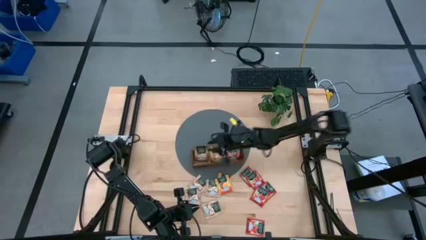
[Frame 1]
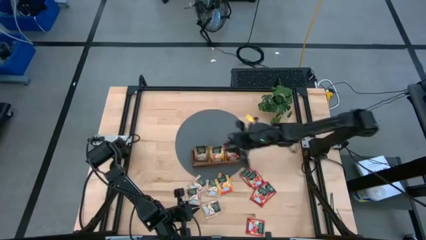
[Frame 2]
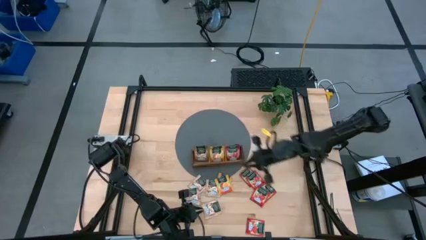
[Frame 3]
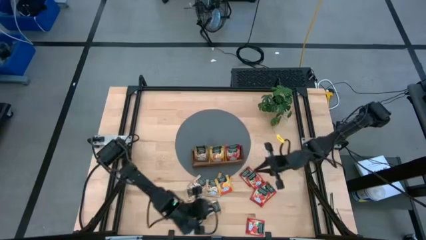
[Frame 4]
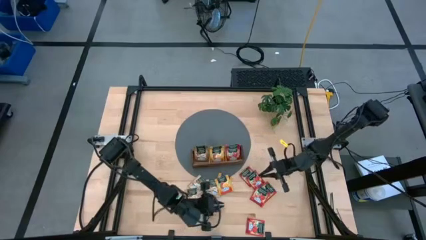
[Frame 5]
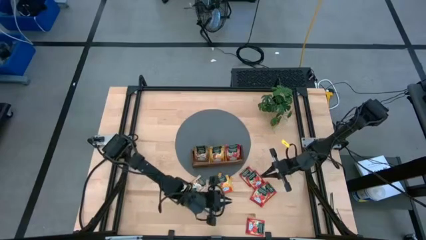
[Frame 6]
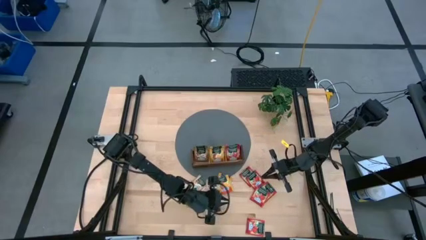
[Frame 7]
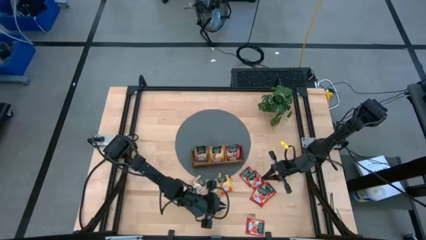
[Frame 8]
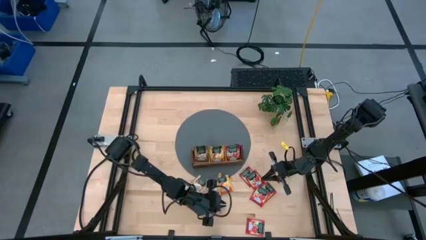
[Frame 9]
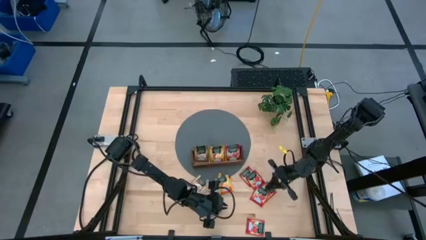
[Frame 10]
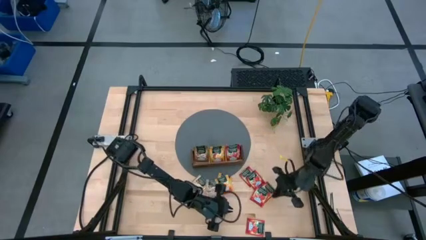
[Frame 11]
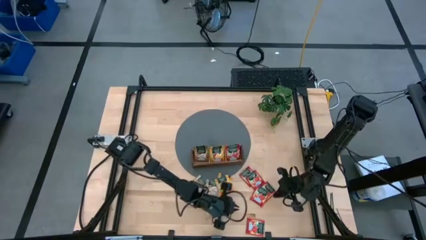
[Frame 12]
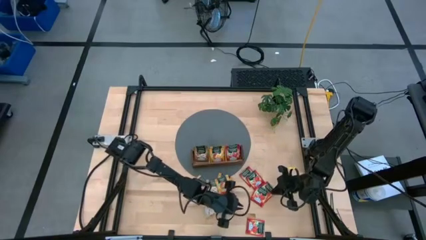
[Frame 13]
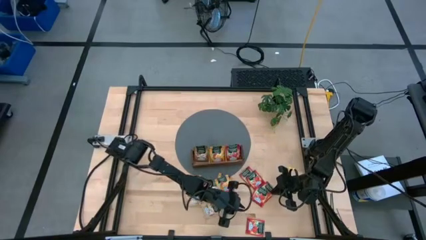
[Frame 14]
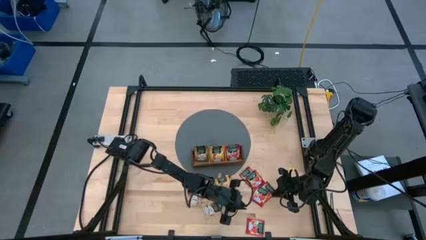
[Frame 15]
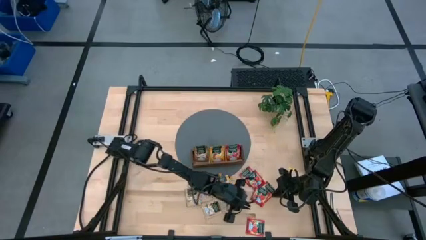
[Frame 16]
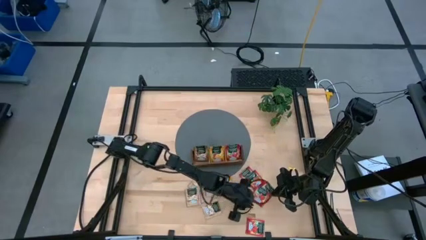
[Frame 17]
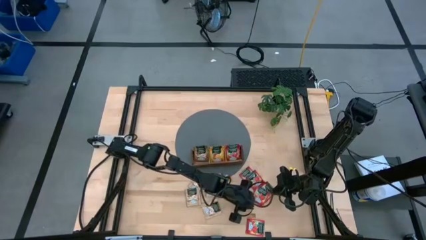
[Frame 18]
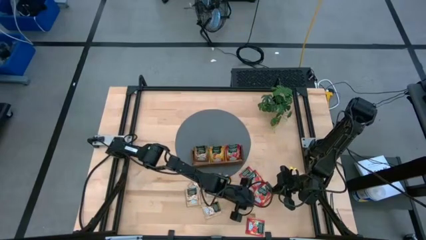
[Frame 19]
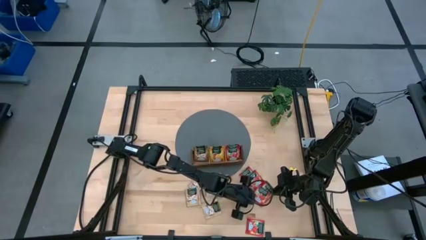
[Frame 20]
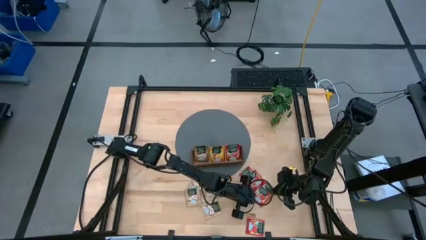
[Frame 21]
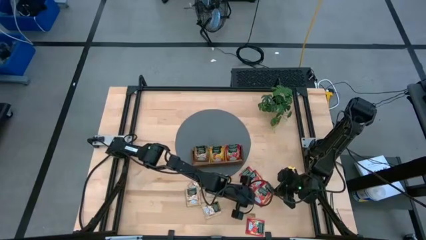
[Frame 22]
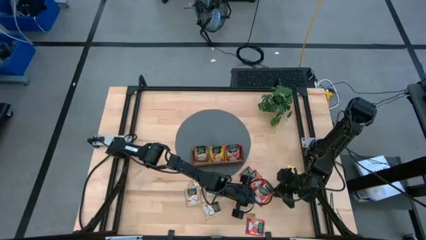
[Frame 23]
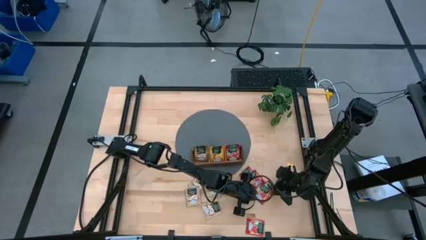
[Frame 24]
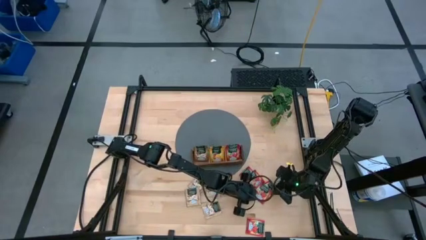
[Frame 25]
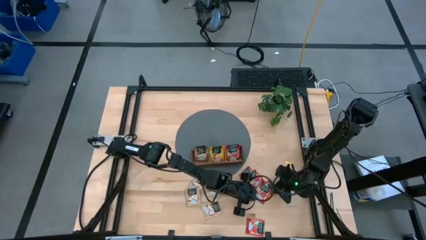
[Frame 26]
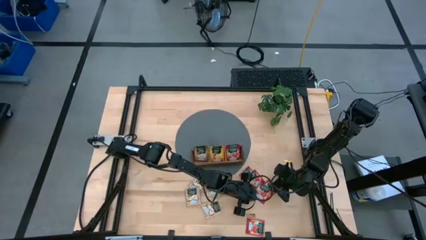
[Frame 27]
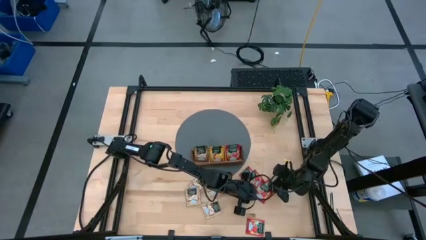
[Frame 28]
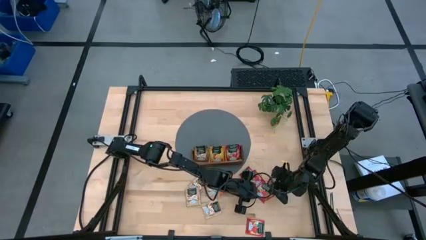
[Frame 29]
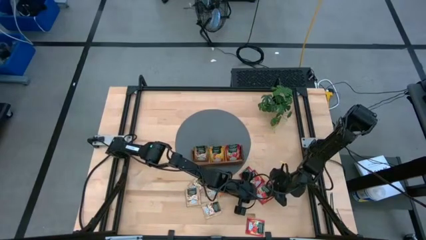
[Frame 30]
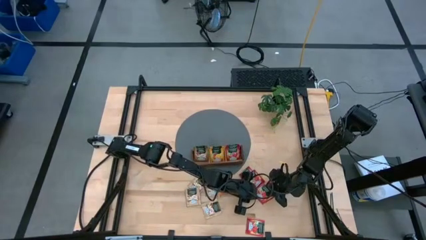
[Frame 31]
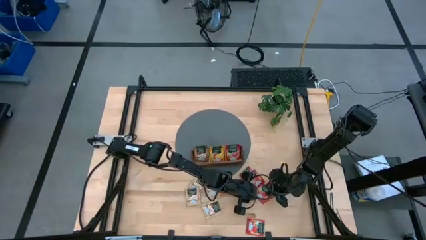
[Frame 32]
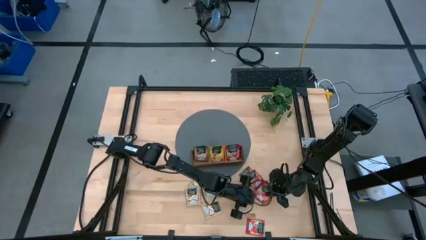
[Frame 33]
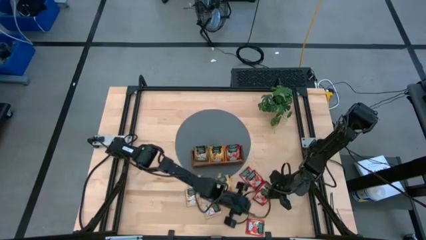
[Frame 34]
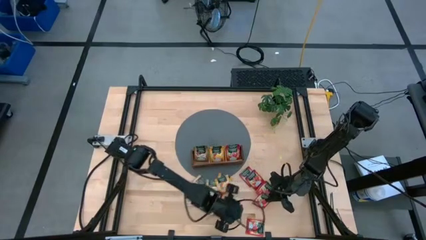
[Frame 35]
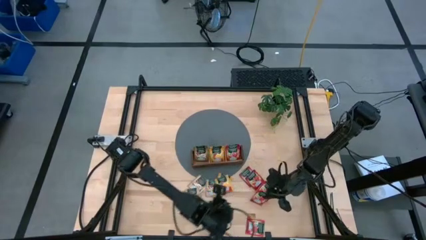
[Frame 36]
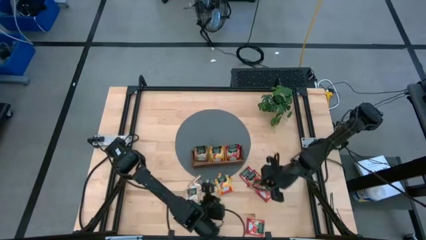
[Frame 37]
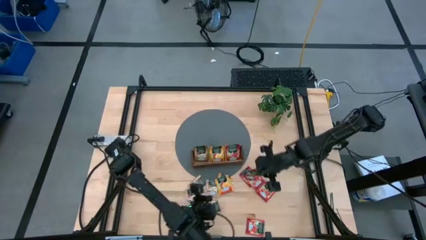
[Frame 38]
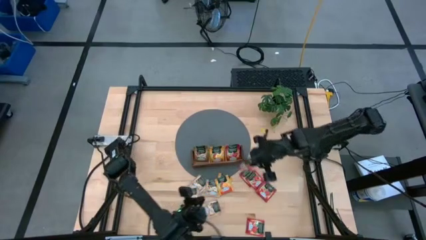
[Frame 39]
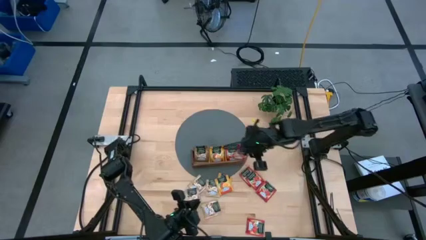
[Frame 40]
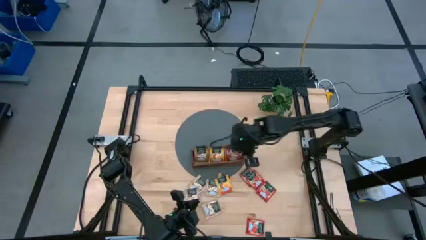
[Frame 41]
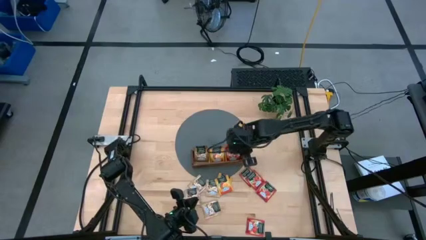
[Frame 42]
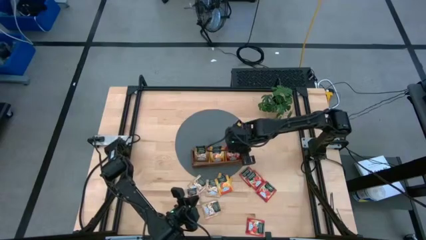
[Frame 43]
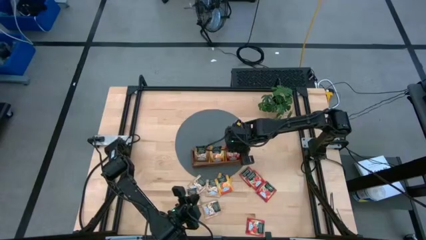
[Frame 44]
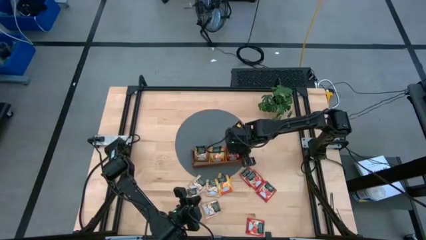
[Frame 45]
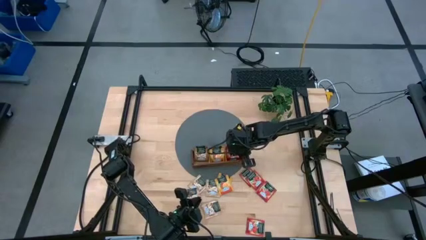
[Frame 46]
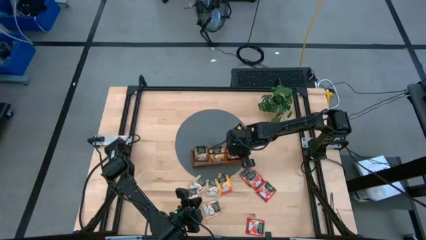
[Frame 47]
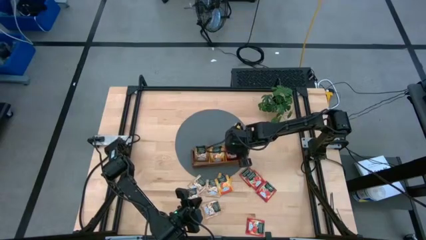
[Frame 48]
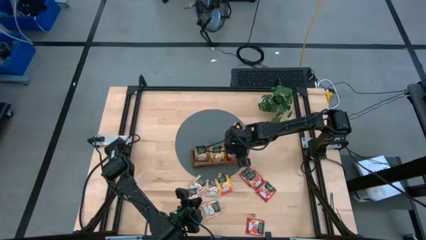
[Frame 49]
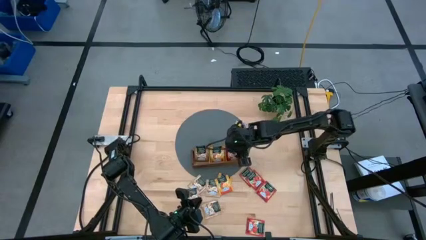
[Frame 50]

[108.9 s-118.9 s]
Task: Pick & Place Tea
Put the red tea bag into the right section of the wooden organizer

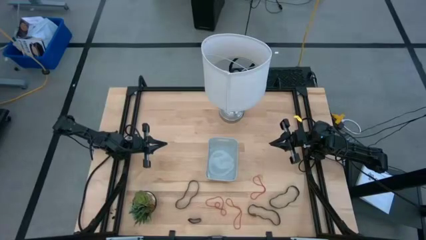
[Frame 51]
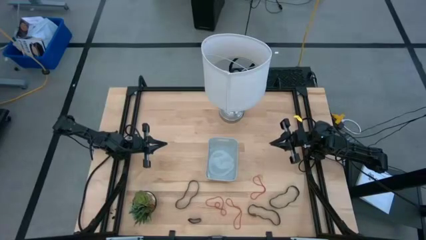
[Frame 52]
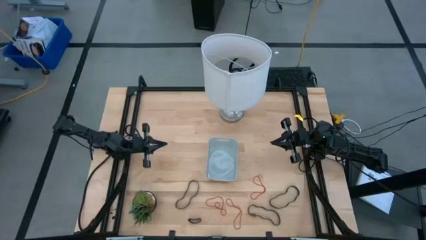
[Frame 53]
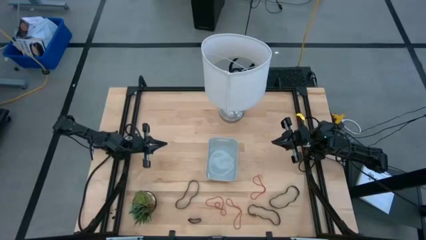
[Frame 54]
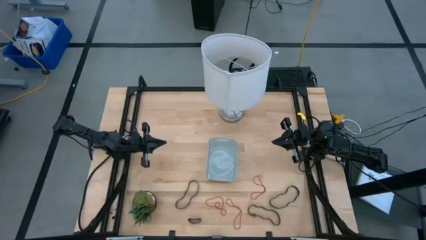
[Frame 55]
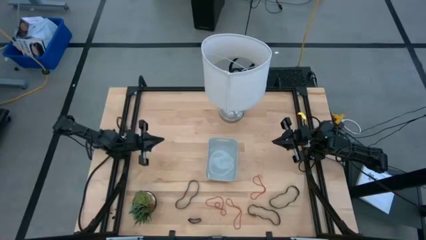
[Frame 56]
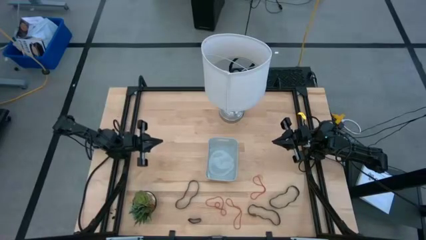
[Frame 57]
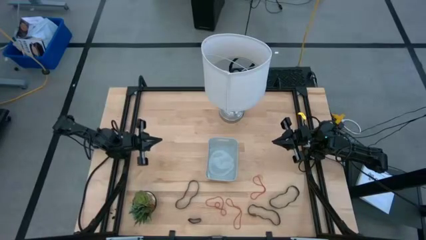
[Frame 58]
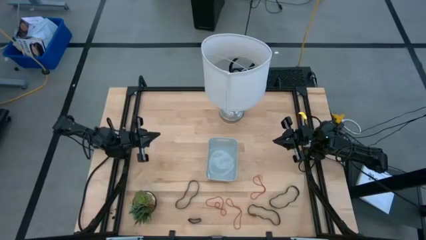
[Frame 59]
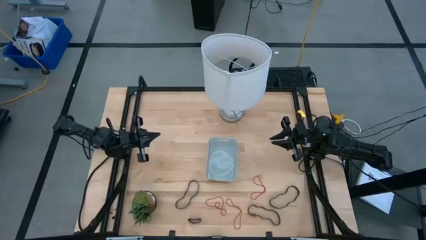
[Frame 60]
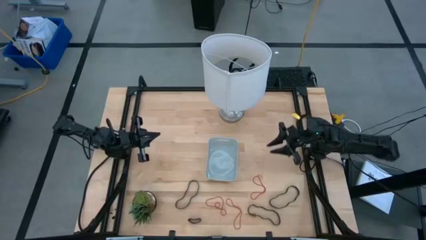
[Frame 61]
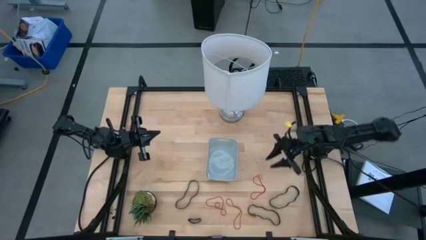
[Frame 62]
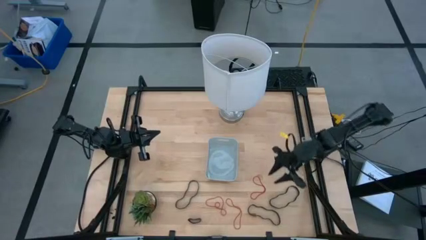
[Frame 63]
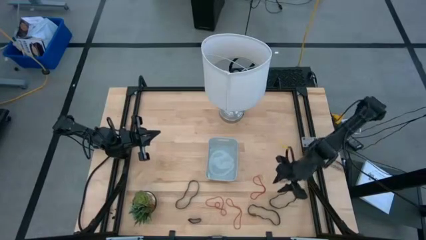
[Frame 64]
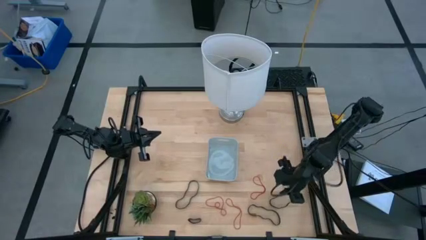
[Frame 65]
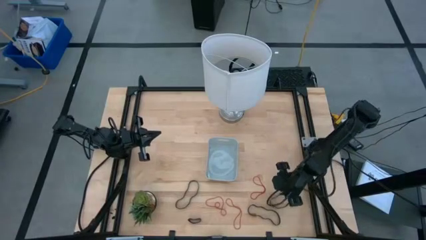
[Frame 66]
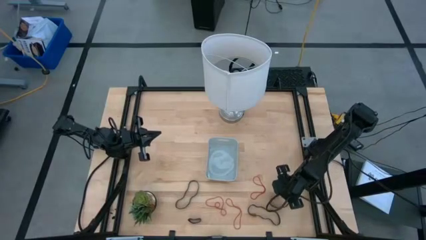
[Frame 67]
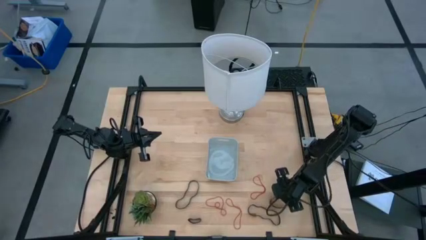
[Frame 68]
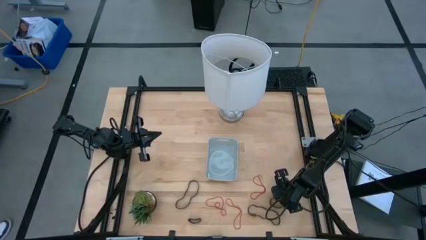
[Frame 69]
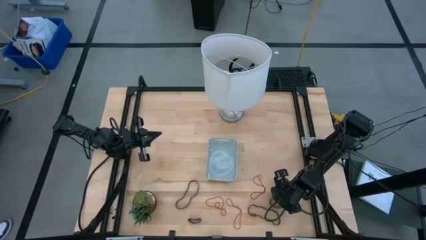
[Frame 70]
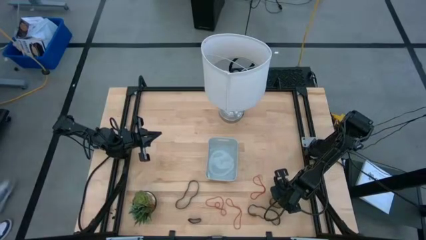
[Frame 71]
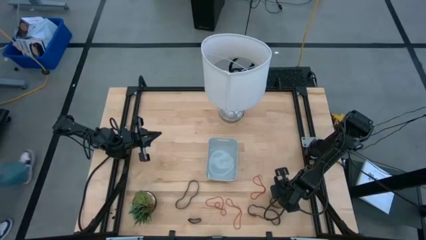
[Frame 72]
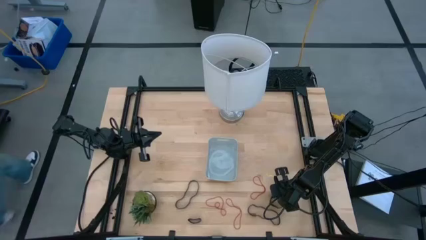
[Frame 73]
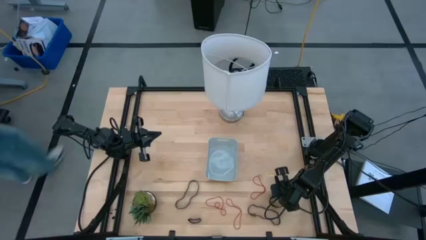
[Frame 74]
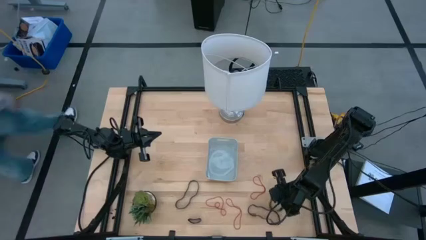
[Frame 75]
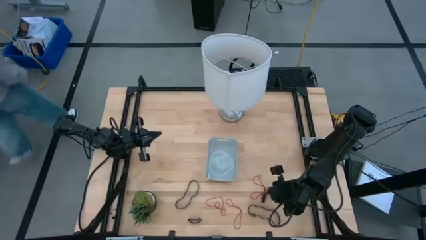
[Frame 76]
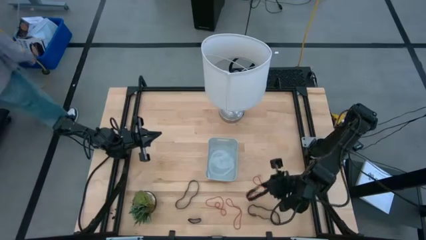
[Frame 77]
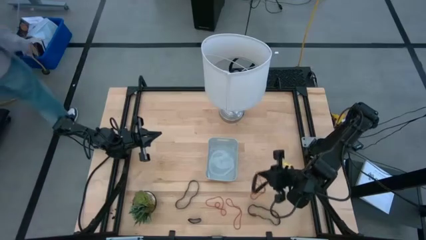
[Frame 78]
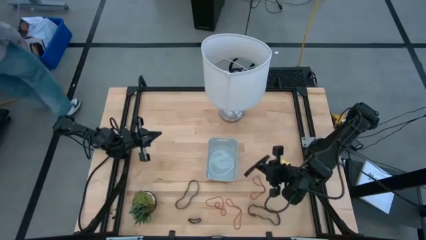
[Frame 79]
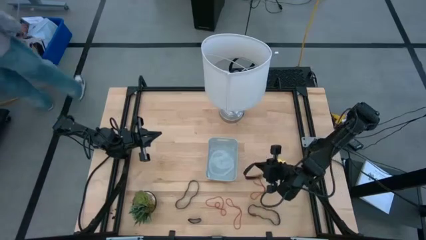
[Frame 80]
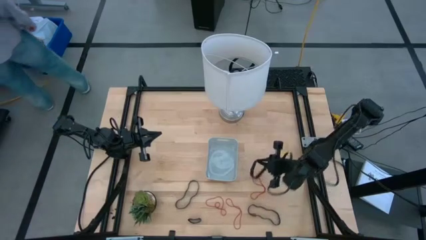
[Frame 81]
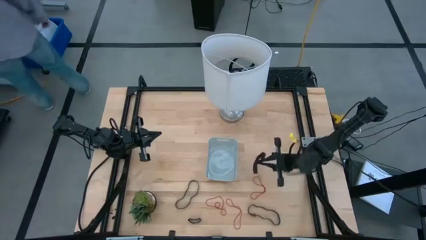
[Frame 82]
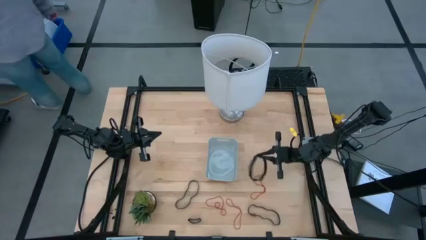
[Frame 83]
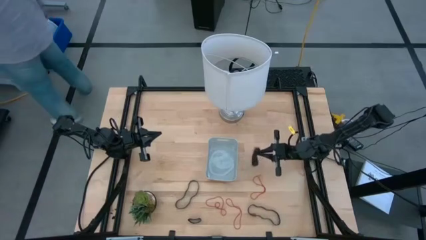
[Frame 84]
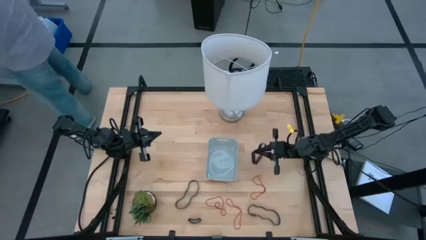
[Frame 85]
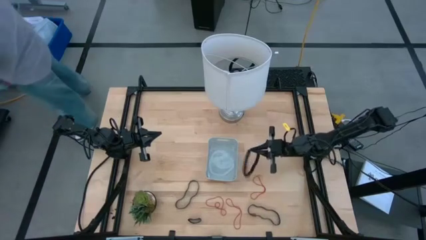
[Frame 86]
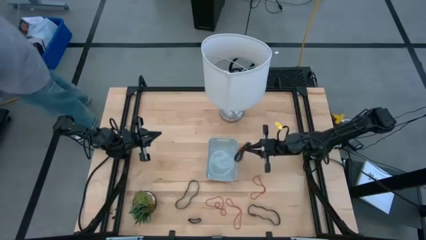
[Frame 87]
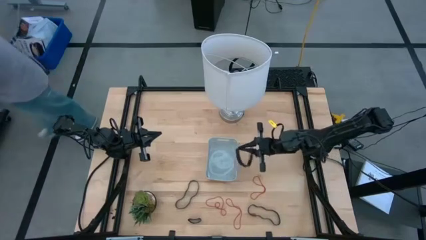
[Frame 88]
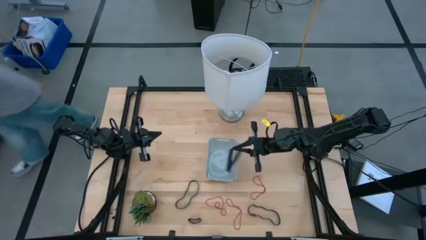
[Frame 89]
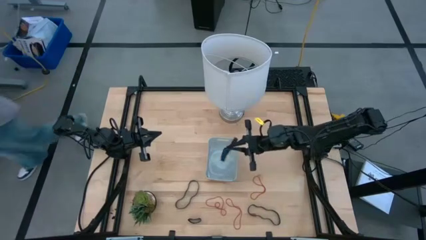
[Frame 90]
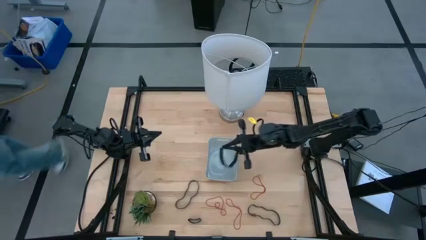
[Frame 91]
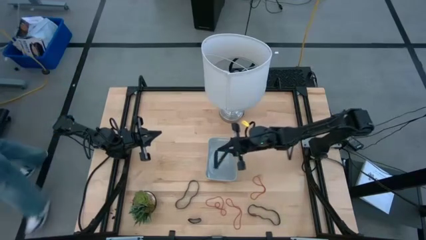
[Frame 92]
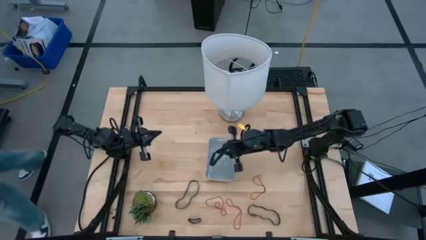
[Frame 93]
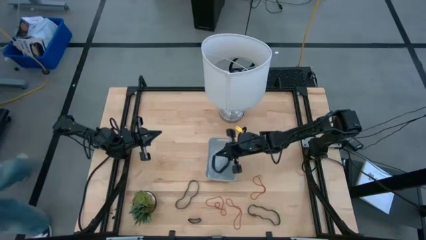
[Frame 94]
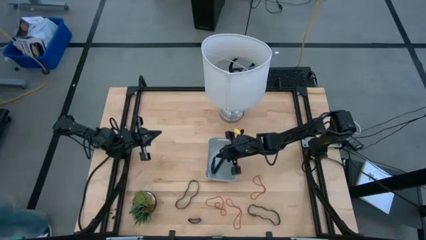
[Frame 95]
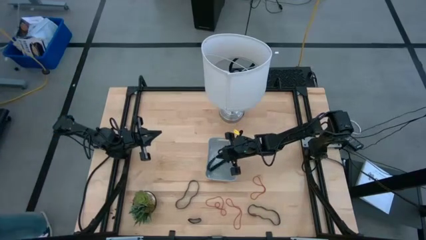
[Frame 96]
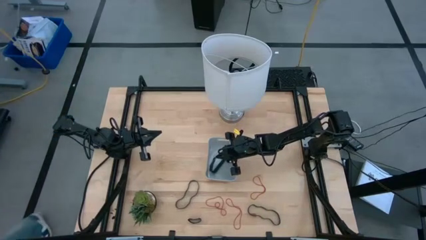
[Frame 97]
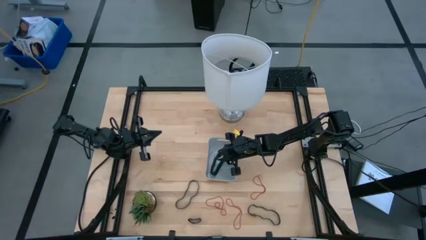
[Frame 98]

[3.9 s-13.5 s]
Task: Pick and place rubber bands into bin
Put the black rubber band into the gray bin
